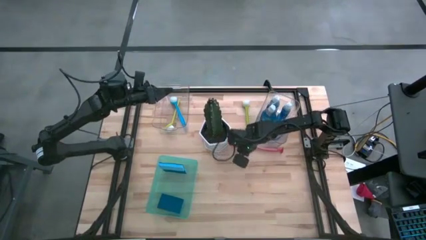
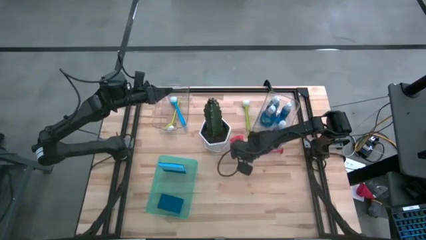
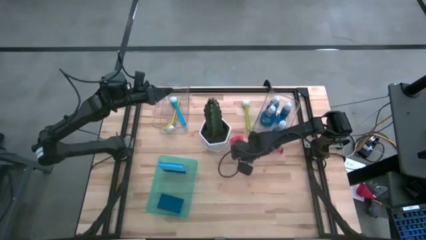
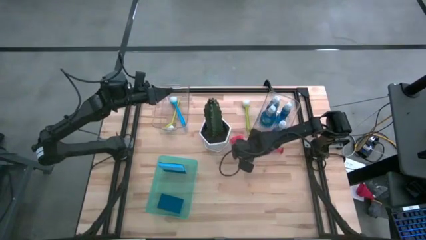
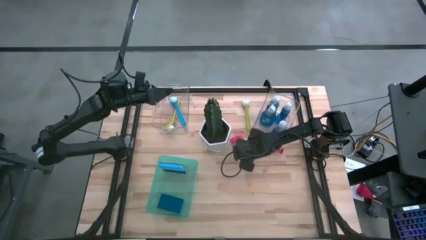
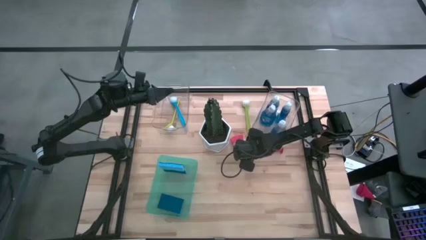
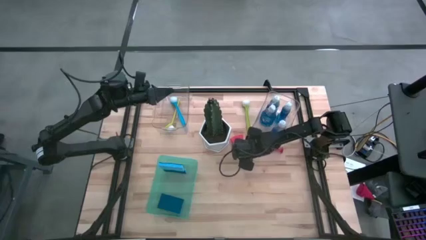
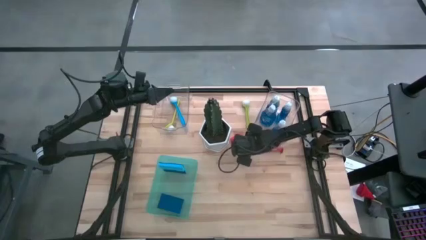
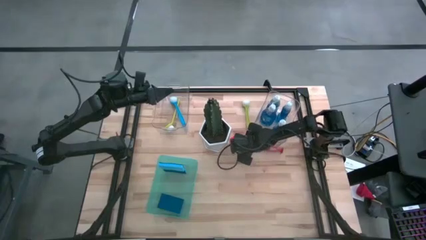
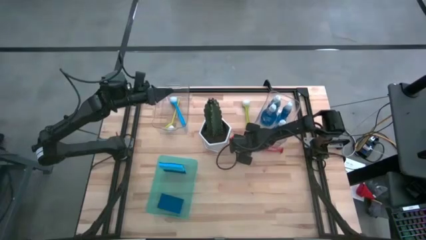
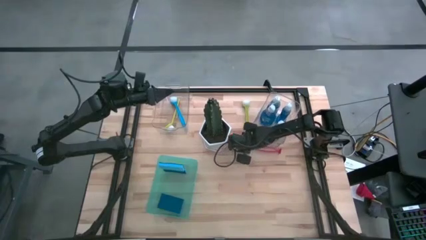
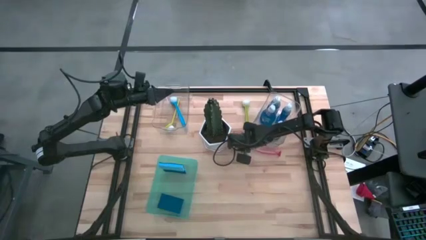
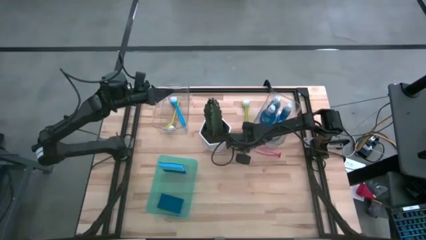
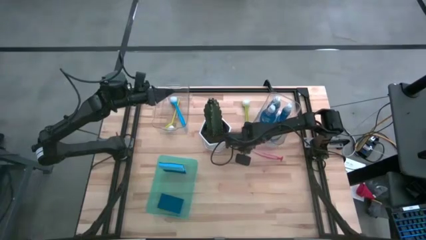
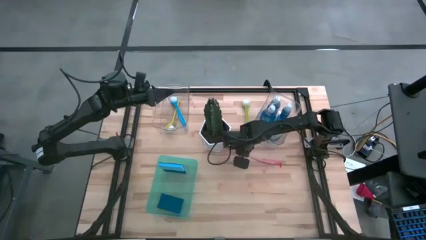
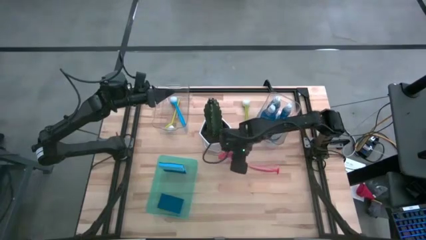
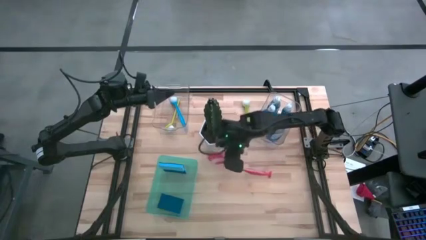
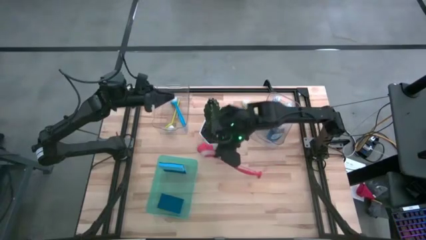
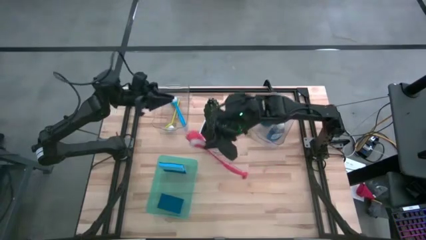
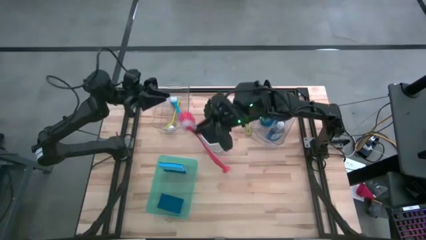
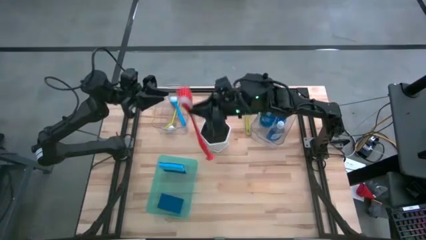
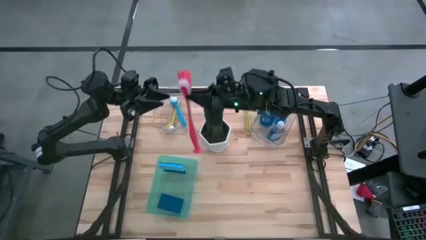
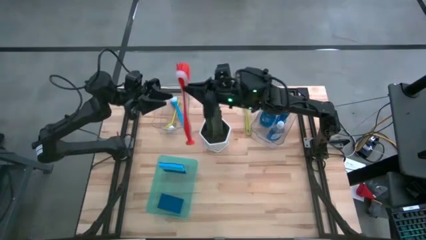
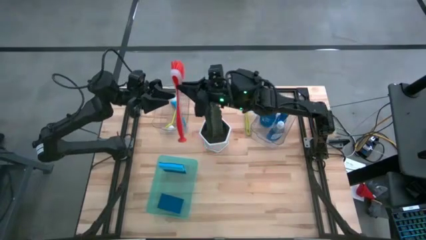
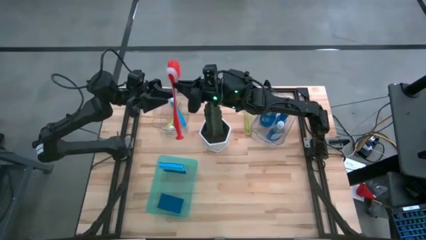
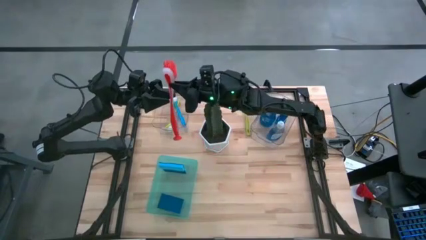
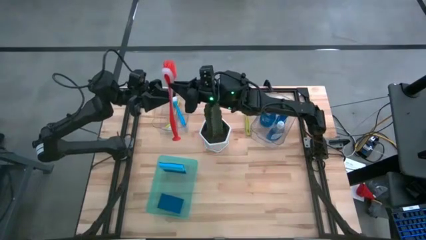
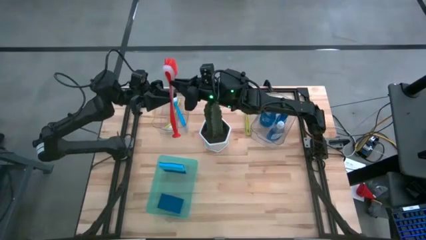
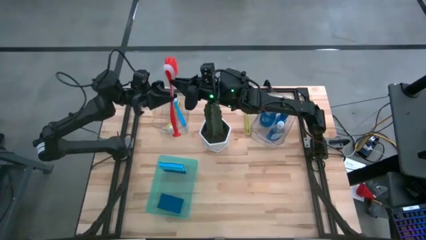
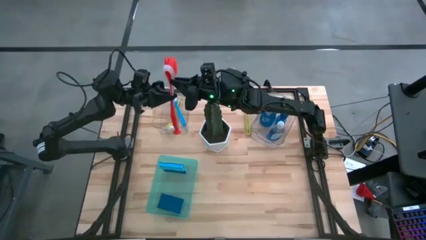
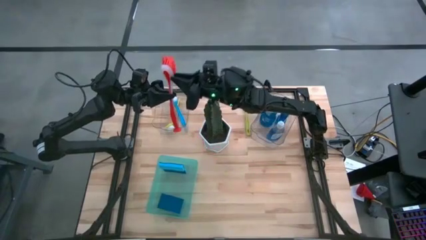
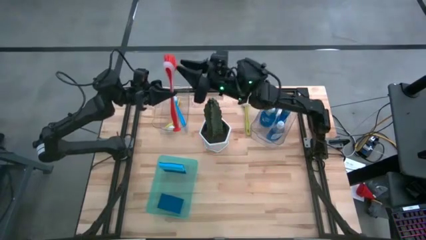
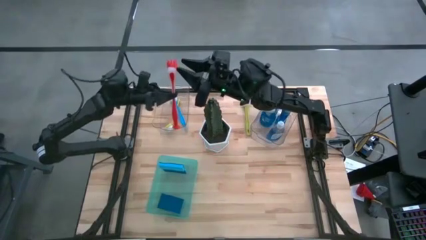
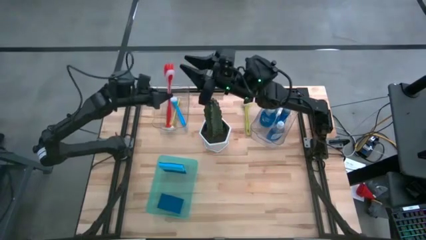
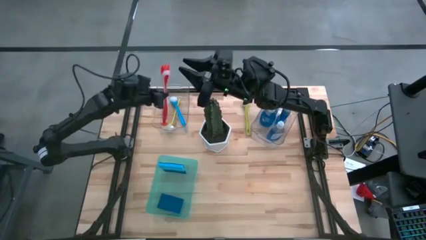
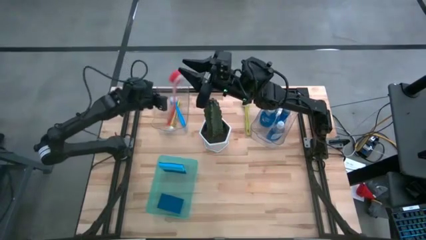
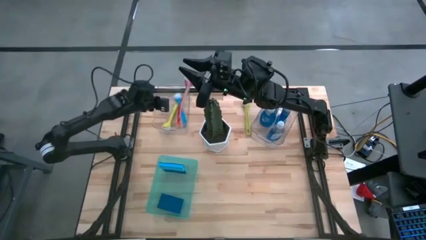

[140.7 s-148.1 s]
Task: Pick & Place Kitchen Sink Supplies
Put the red dishwashing brush into the left transparent bin

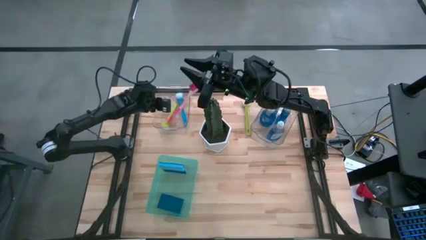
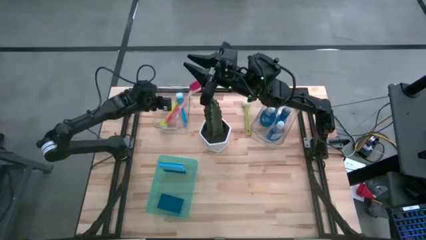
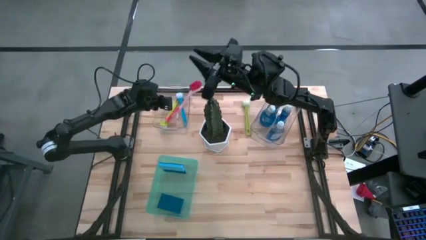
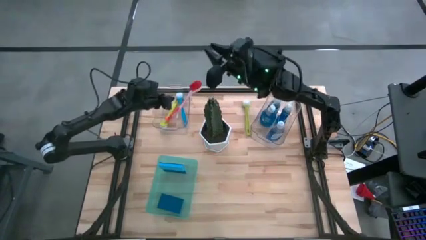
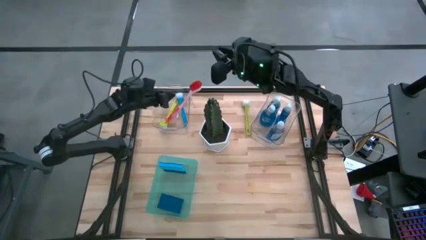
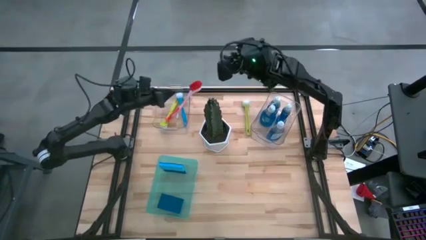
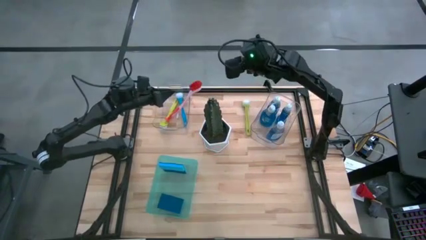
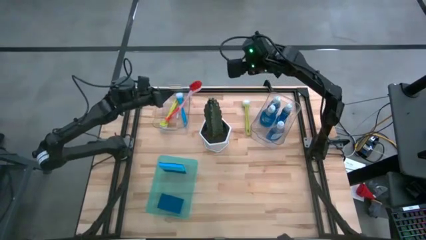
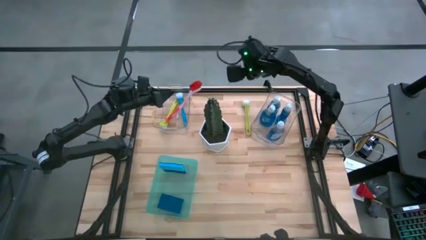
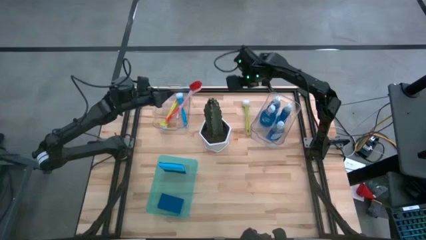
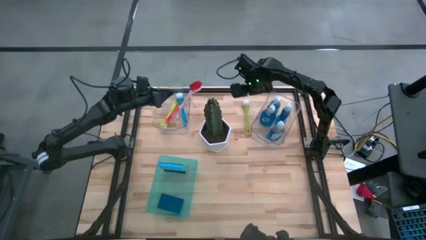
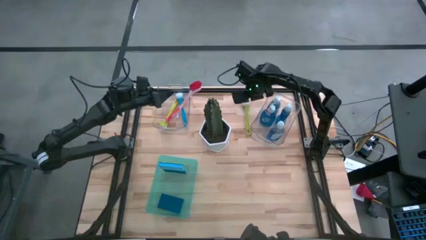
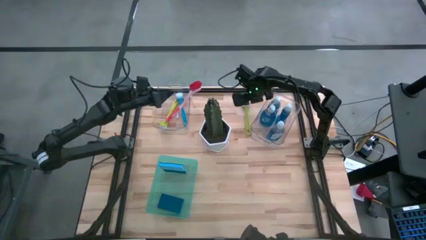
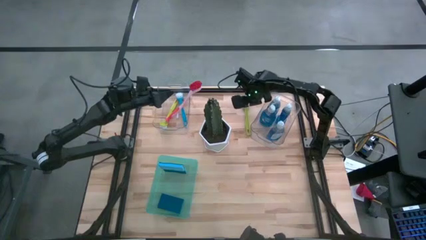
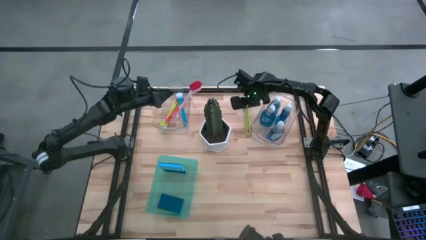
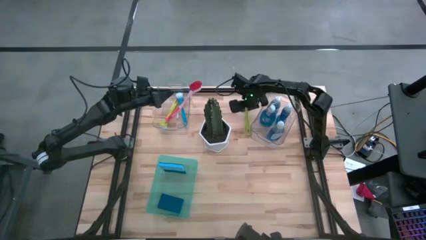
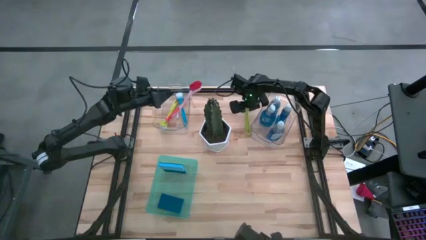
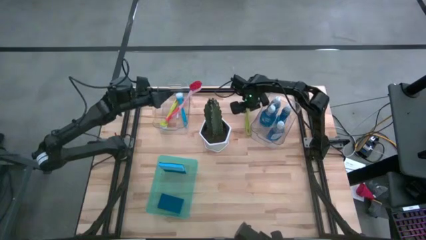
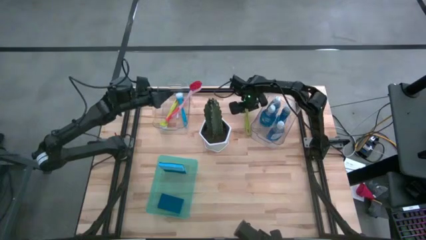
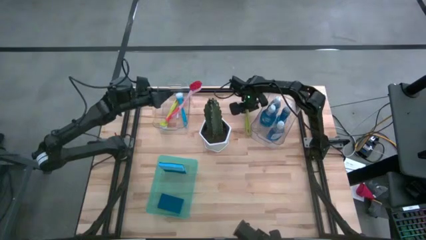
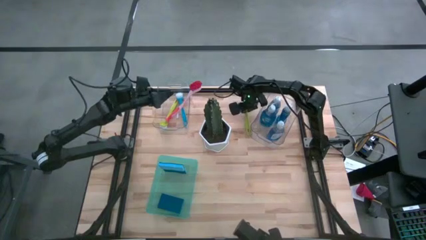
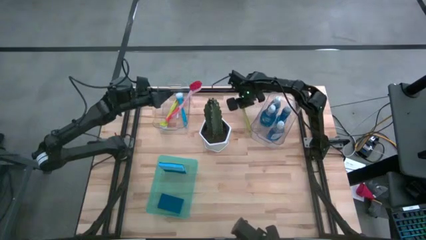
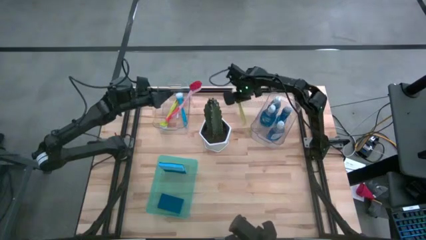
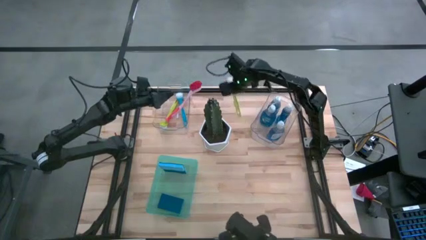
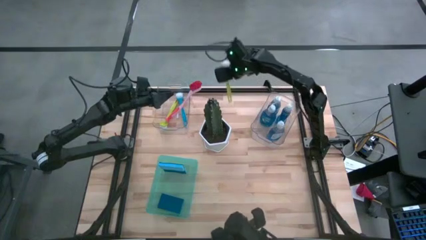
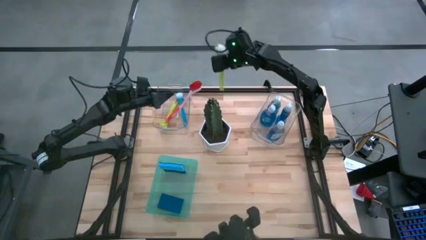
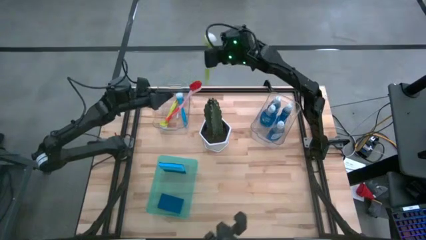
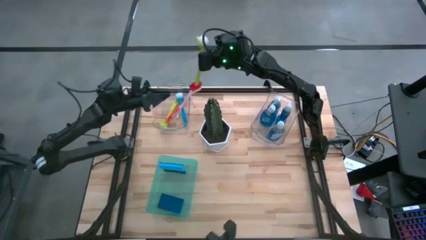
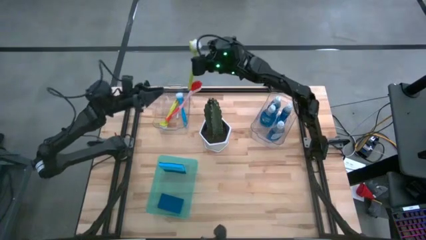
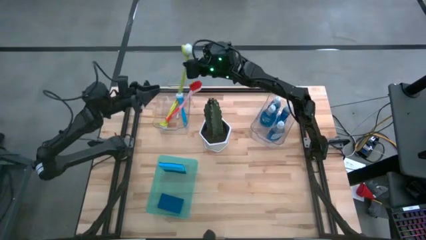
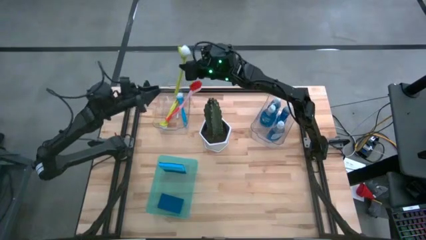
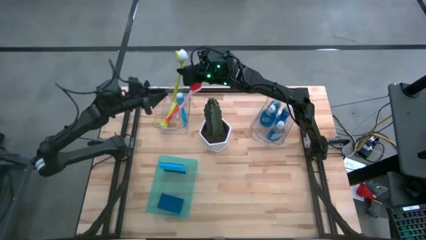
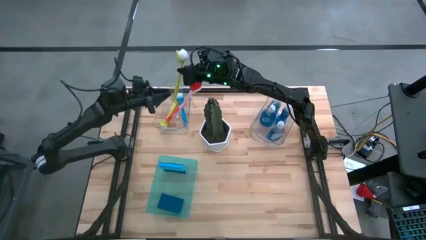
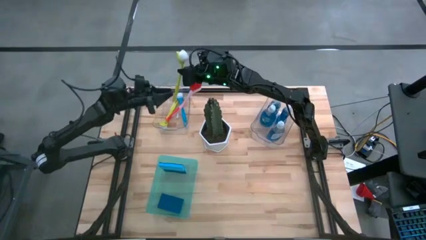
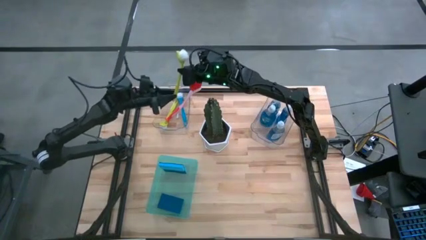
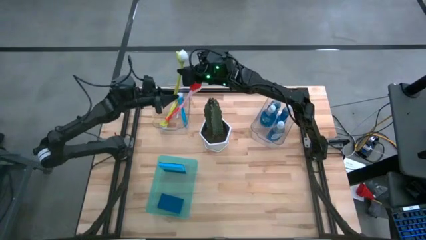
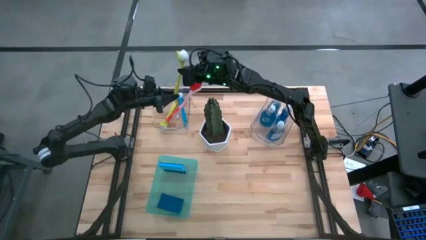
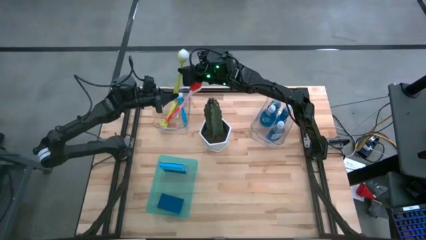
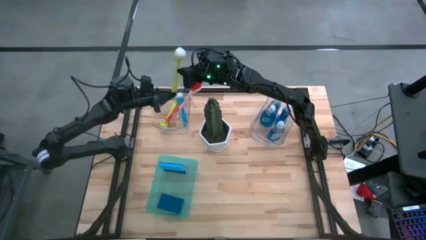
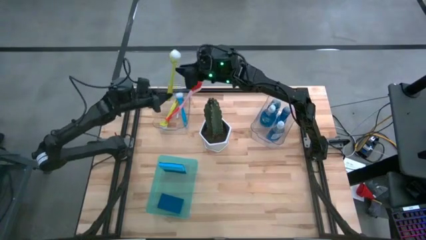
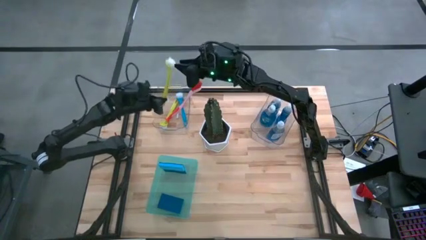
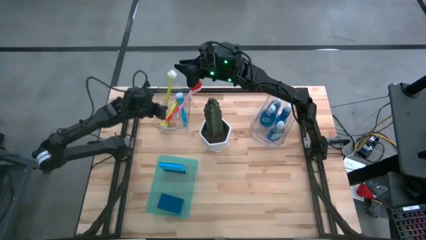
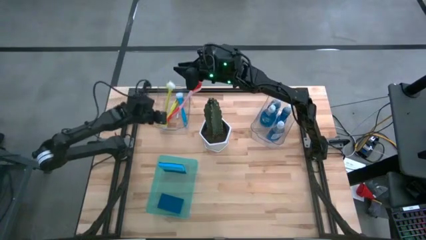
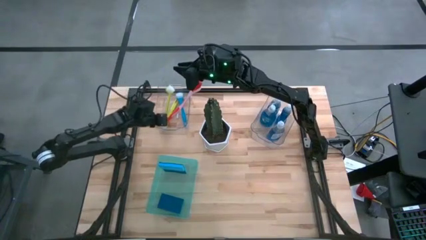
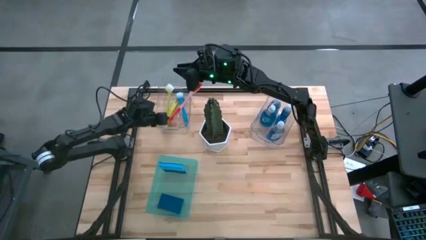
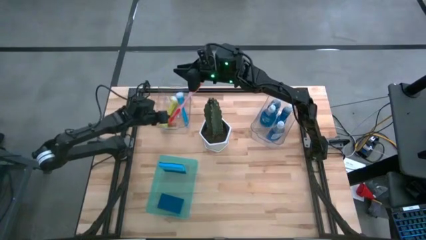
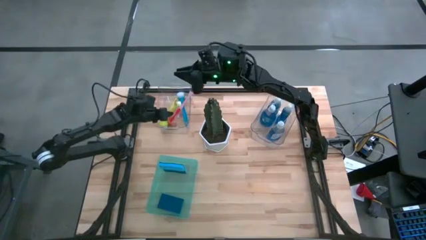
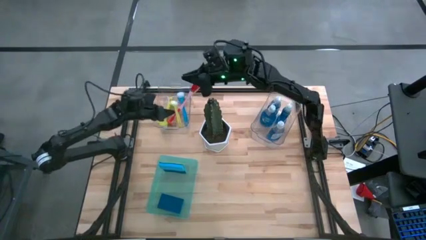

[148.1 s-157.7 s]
Put the light green dishwashing brush into the left transparent bin
